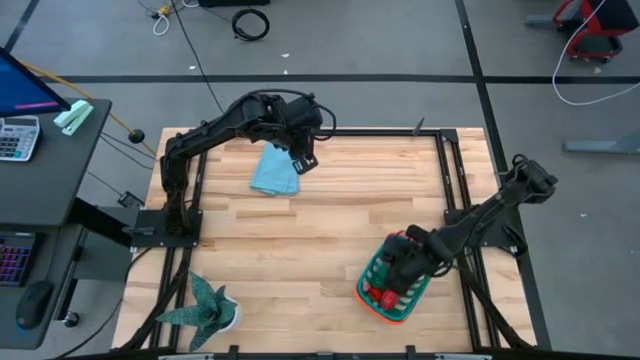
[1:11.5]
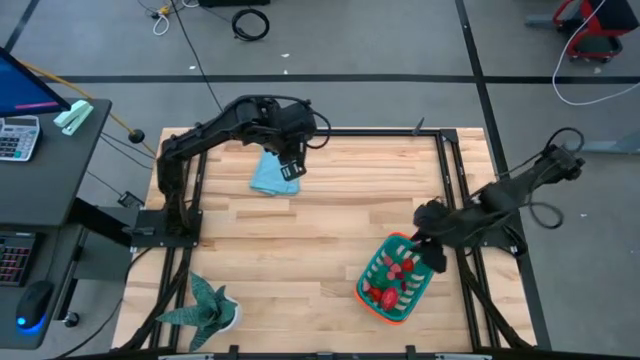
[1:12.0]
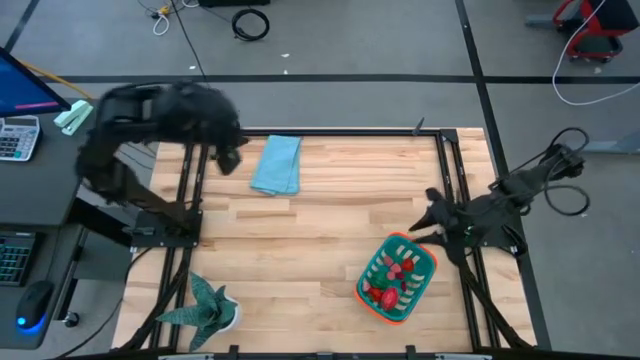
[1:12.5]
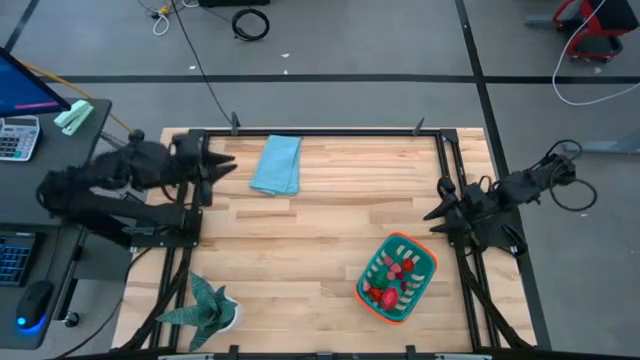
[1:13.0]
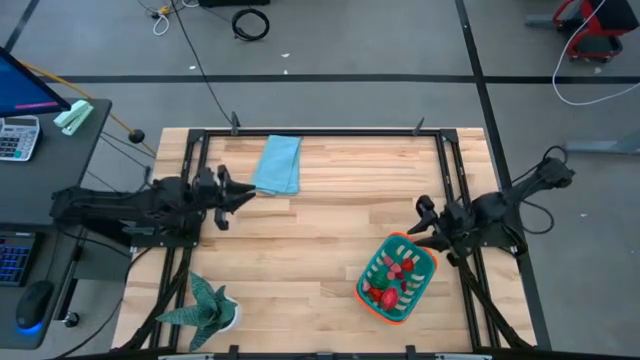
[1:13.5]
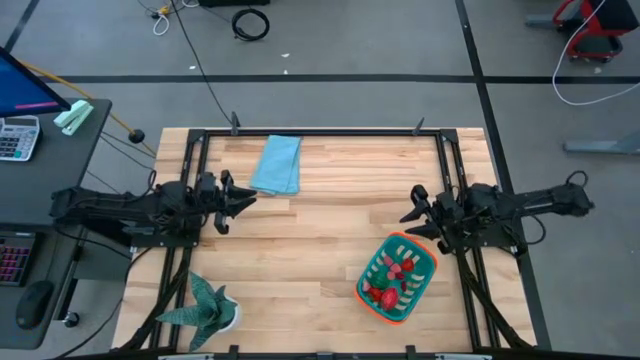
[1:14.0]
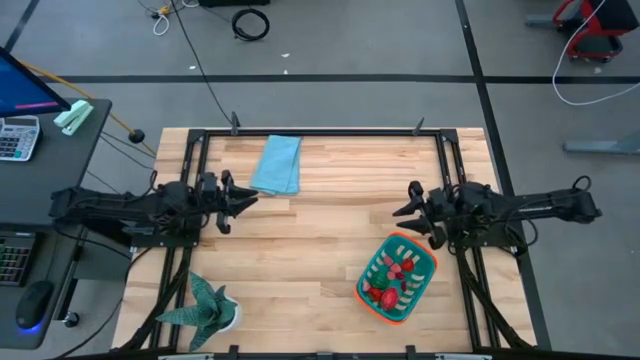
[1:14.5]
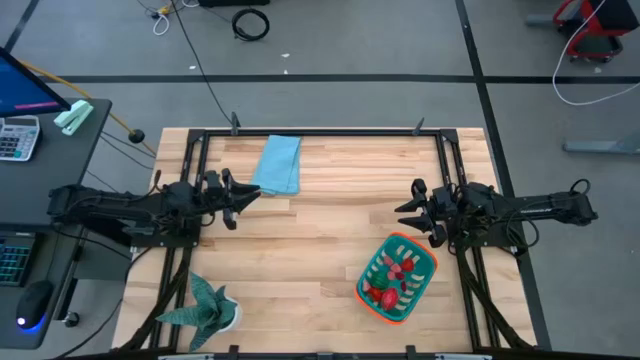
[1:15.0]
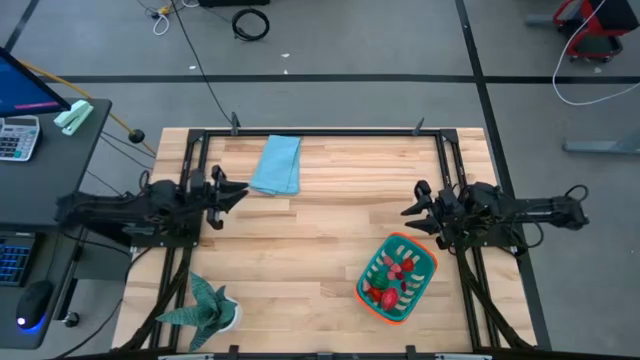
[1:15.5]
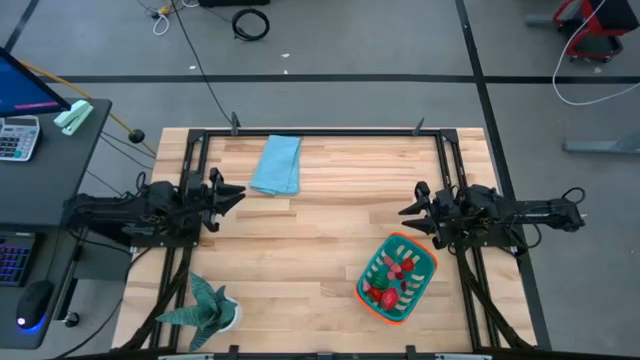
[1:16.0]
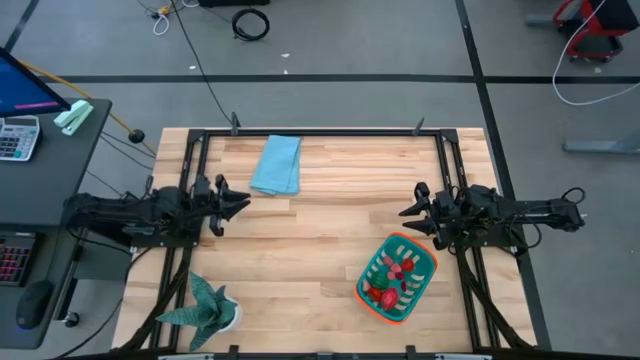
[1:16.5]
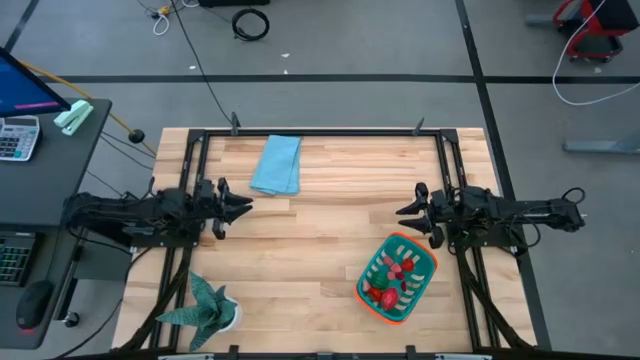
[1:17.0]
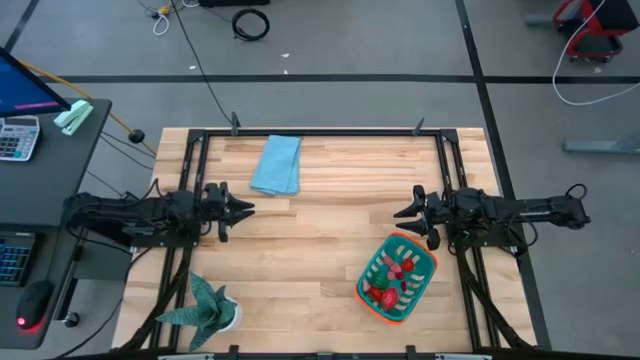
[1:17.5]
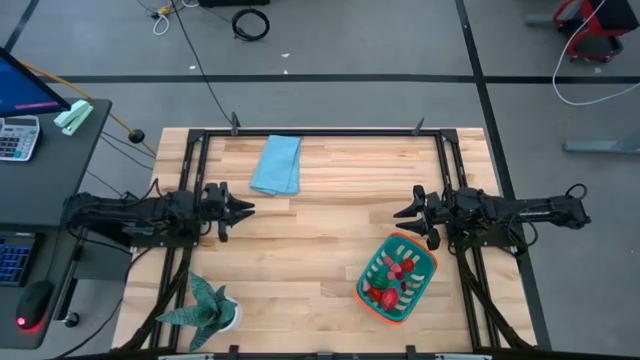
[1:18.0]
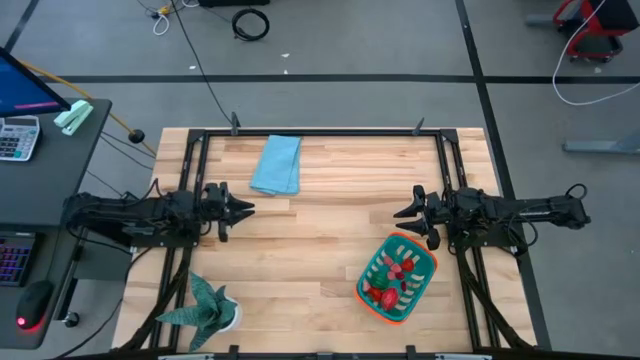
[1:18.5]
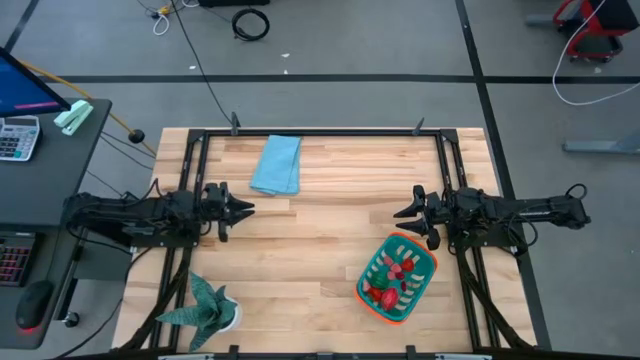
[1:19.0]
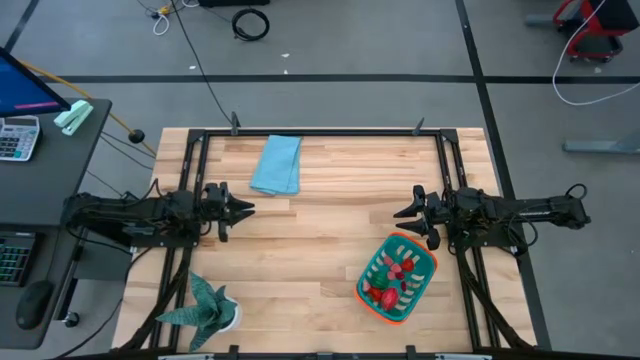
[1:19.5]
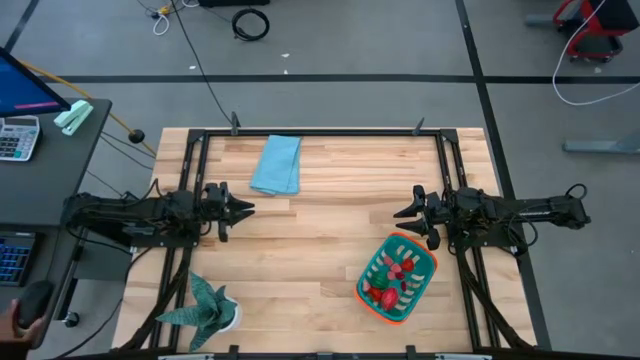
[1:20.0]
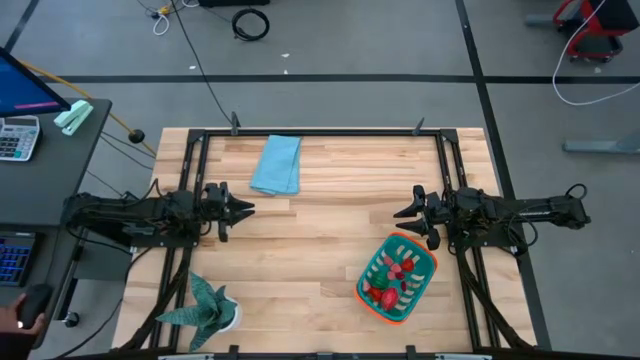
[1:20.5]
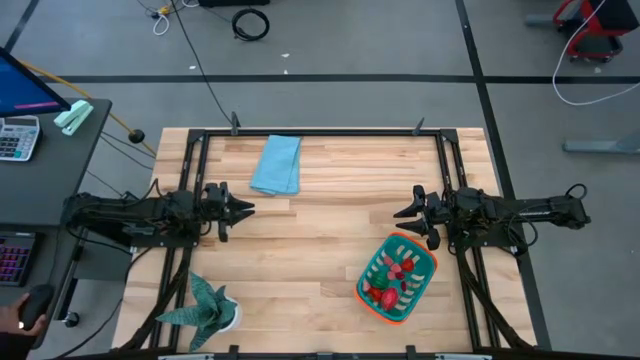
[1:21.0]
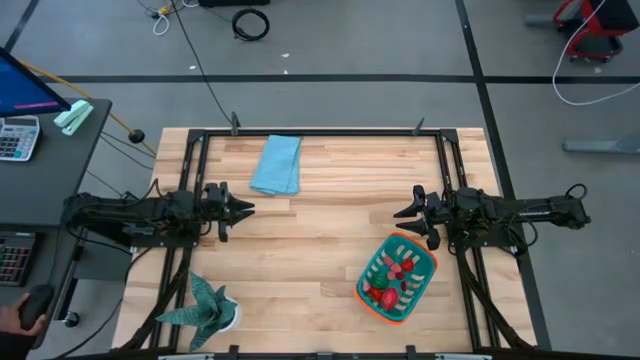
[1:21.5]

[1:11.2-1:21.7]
Task: Pick and placing Produce into tupperware
Return to Home Position

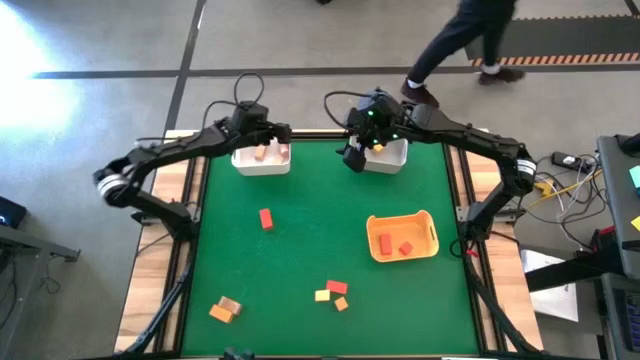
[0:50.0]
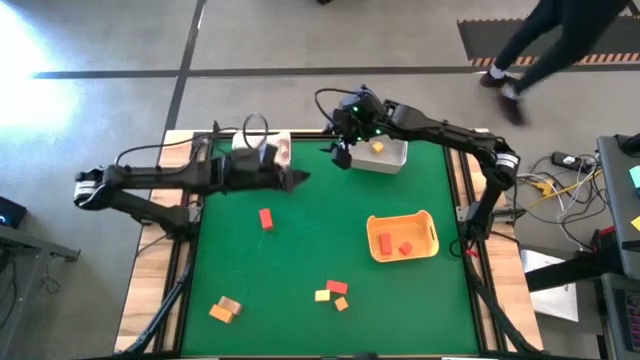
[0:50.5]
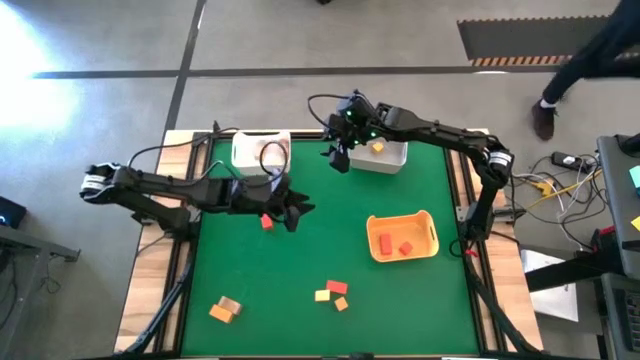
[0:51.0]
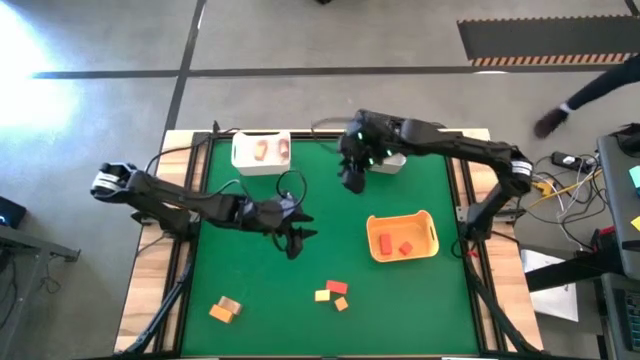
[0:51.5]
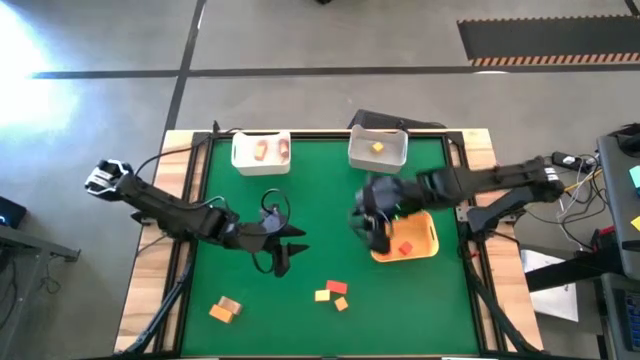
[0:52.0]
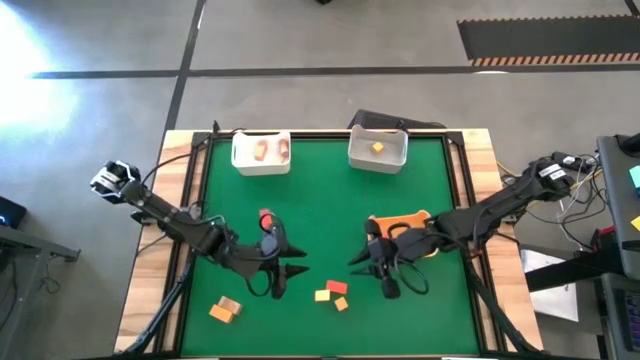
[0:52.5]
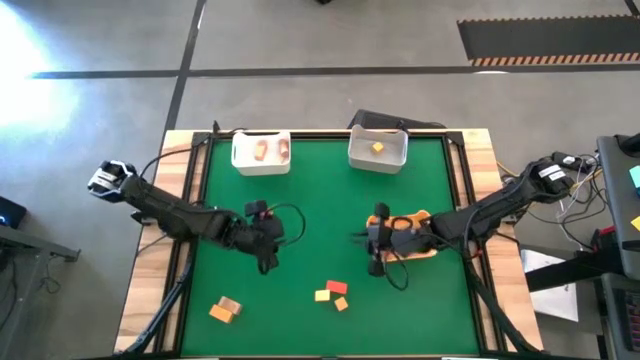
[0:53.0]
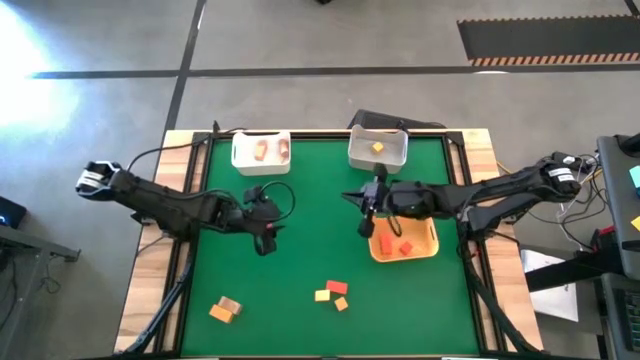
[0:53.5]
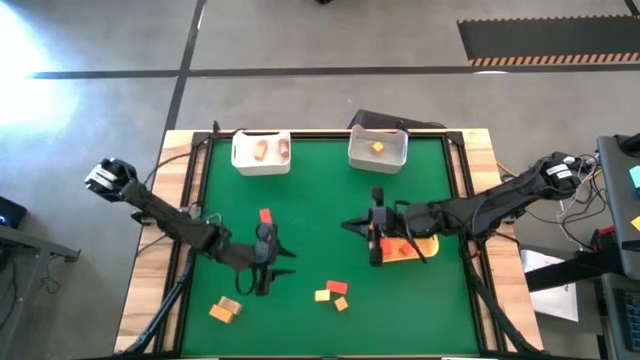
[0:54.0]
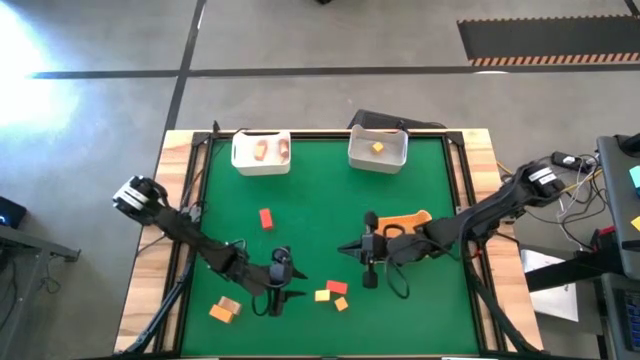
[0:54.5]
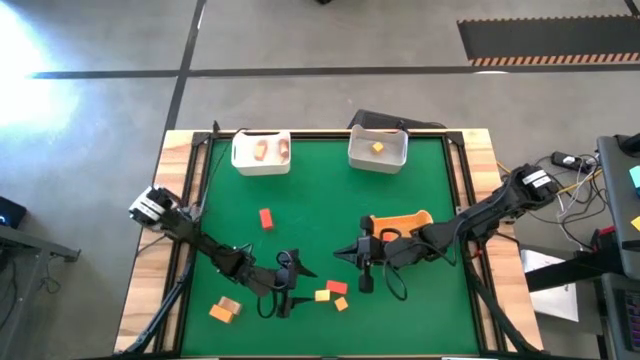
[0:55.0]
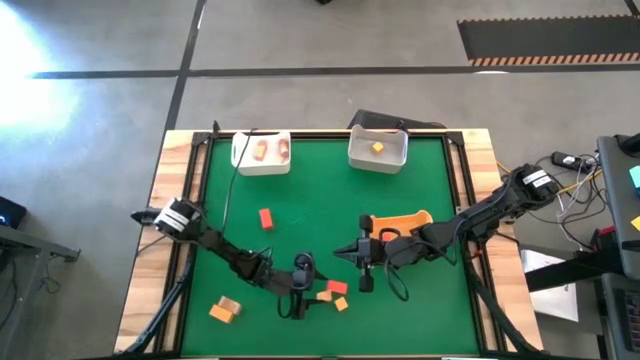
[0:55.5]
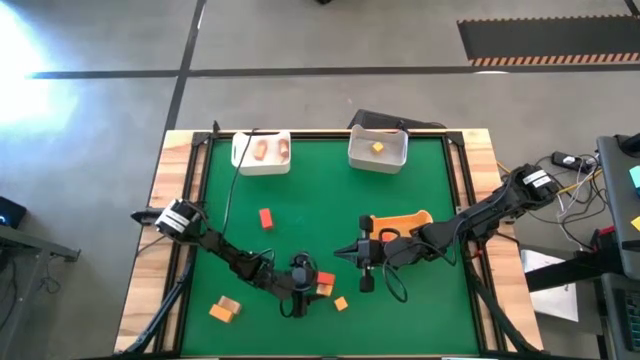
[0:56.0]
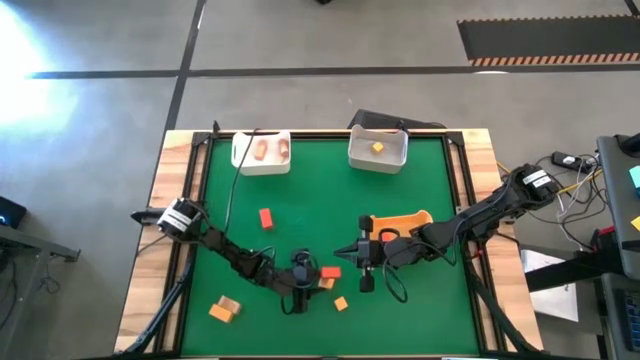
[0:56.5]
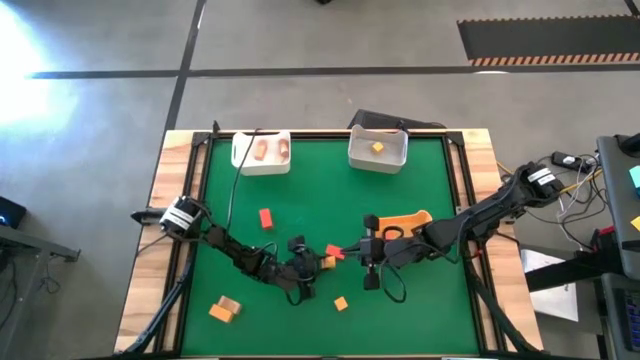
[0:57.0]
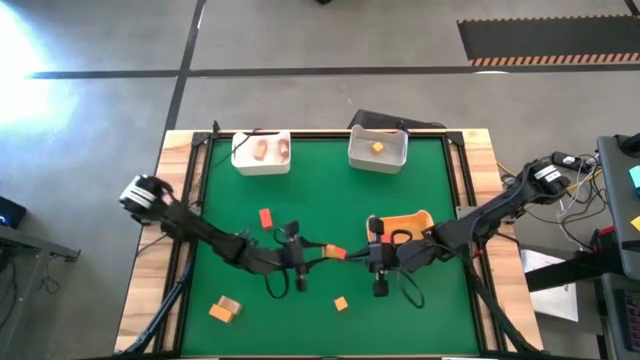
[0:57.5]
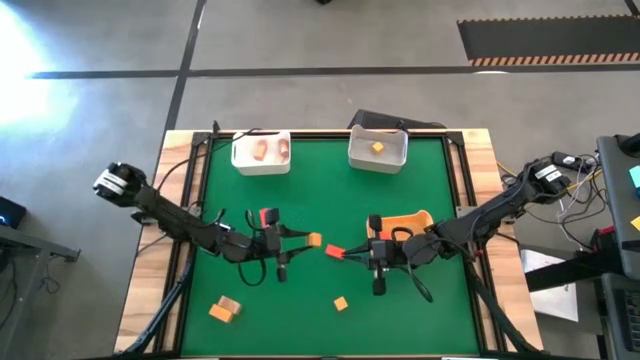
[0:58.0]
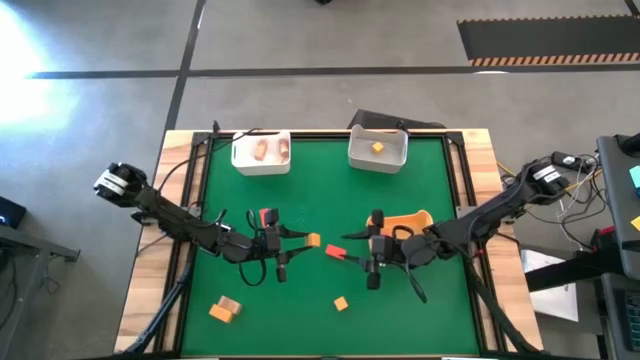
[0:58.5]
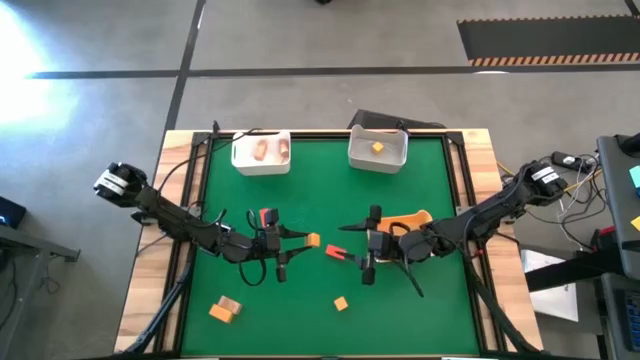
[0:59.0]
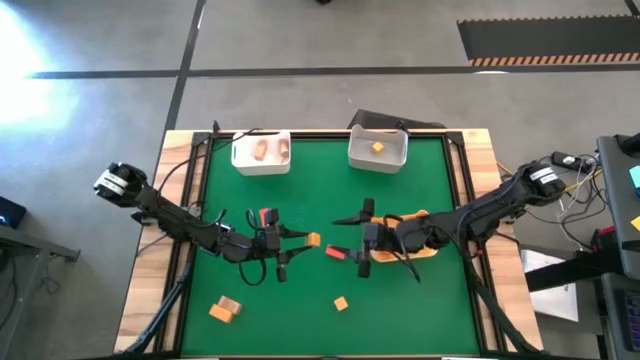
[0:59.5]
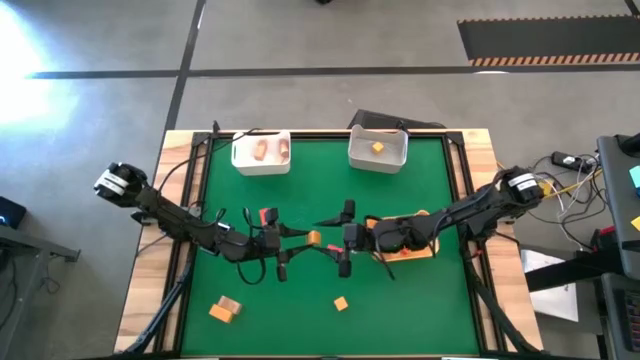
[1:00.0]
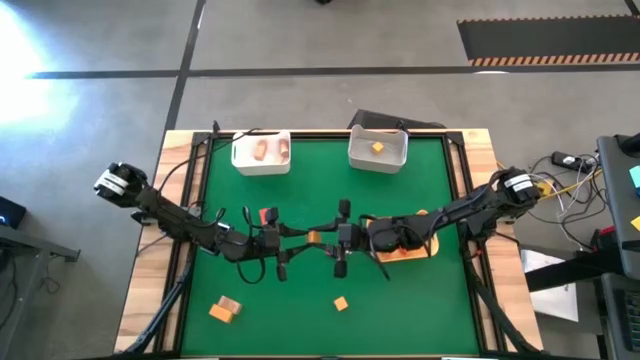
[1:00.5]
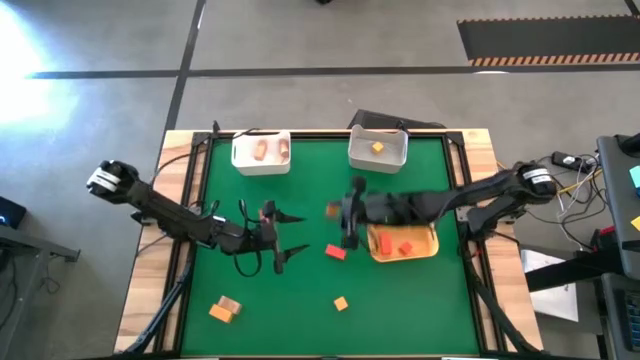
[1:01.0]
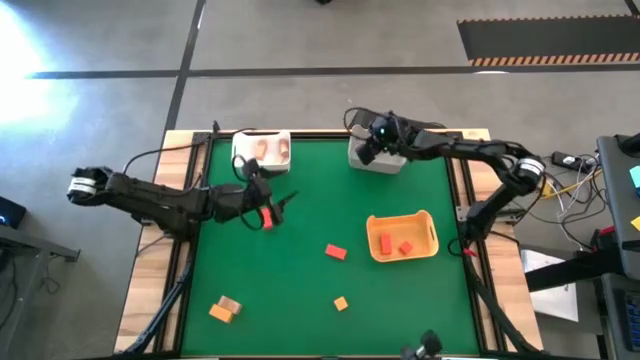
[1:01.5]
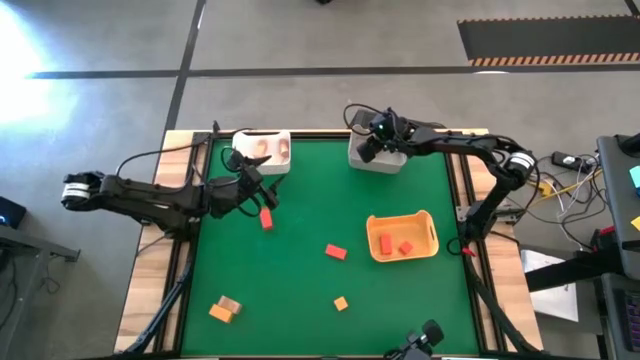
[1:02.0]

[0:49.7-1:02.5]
Task: Sort & place blocks by color
Put the yellow block into the gray bin
